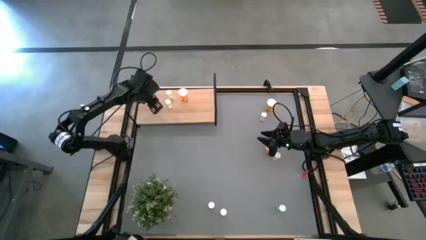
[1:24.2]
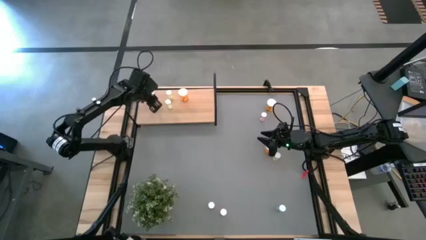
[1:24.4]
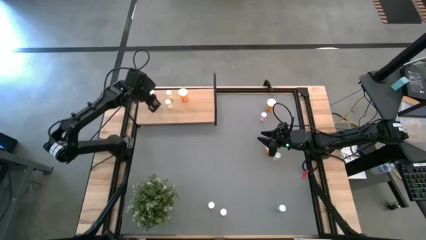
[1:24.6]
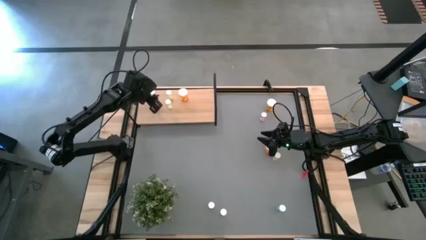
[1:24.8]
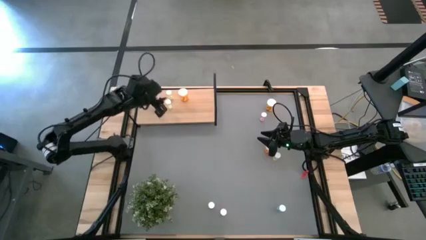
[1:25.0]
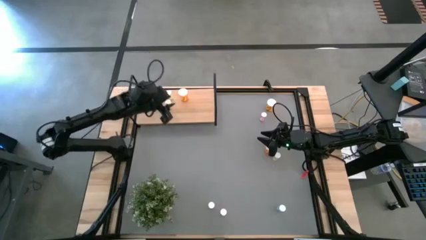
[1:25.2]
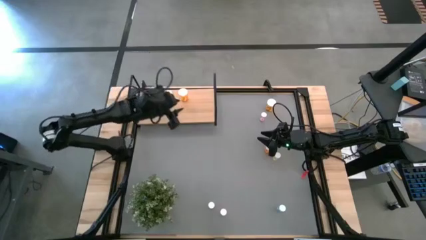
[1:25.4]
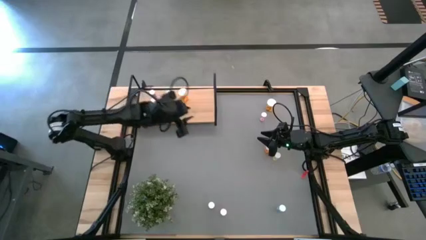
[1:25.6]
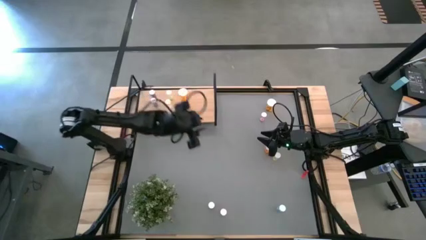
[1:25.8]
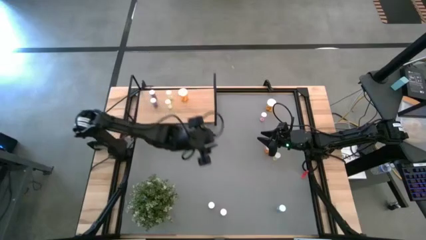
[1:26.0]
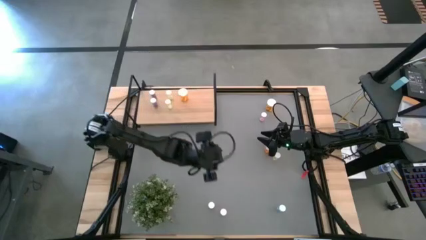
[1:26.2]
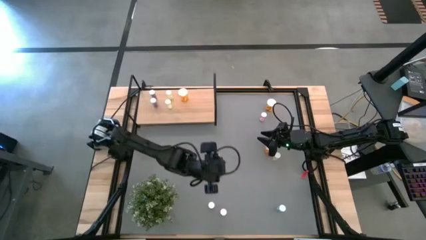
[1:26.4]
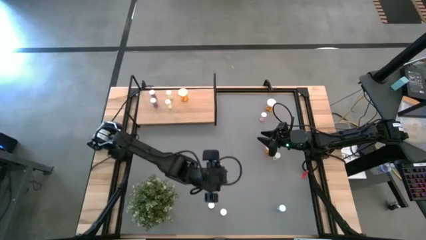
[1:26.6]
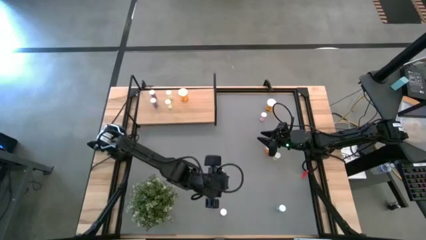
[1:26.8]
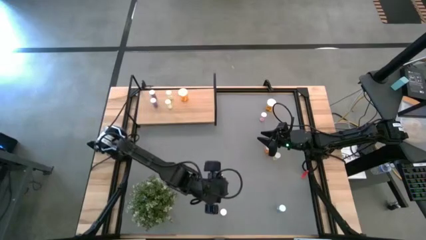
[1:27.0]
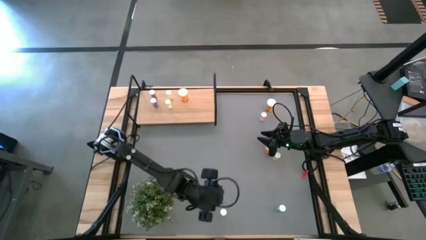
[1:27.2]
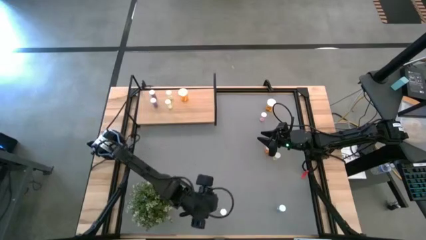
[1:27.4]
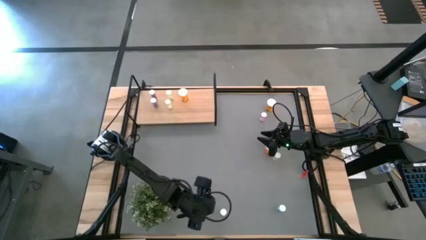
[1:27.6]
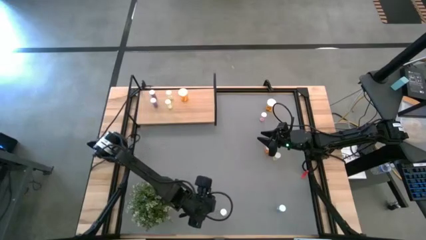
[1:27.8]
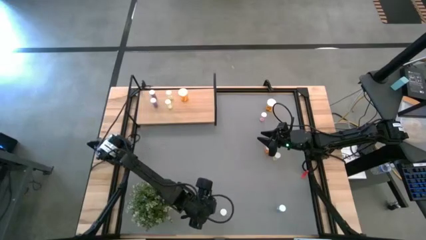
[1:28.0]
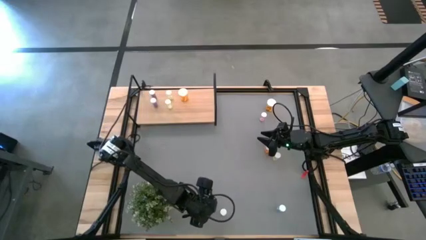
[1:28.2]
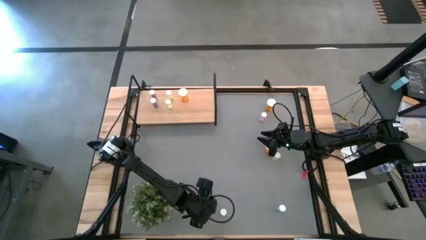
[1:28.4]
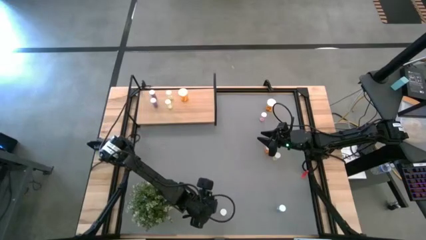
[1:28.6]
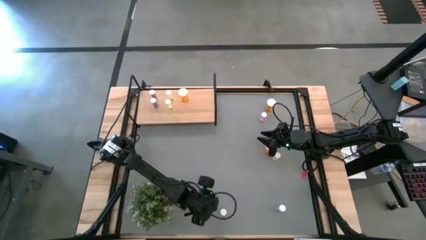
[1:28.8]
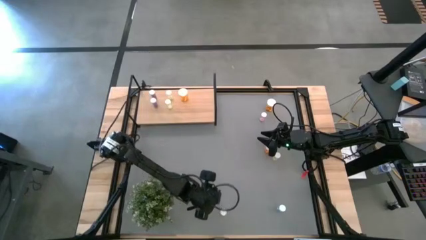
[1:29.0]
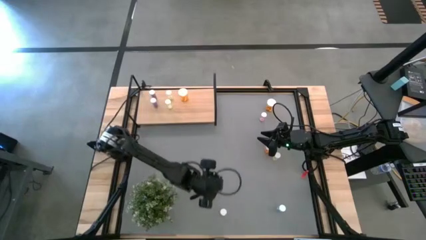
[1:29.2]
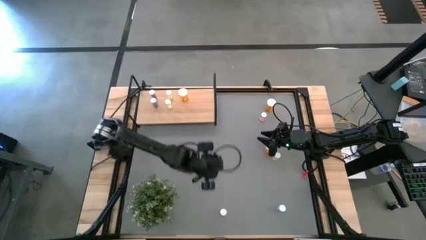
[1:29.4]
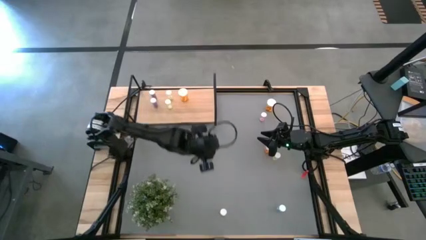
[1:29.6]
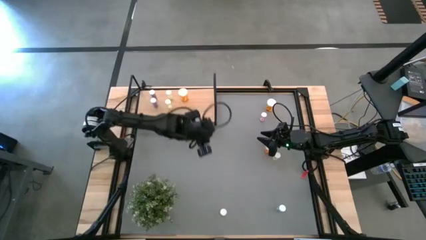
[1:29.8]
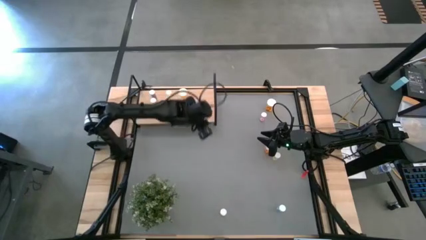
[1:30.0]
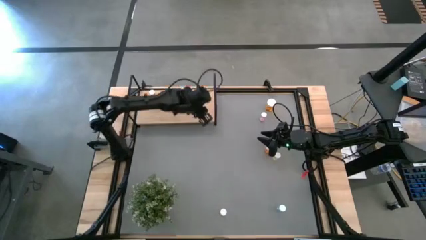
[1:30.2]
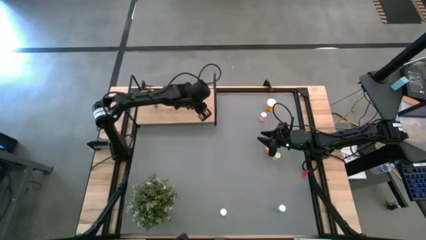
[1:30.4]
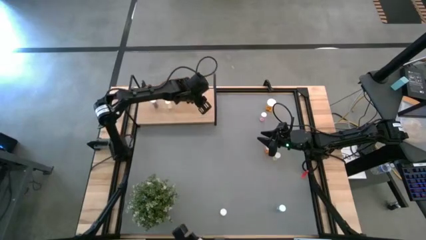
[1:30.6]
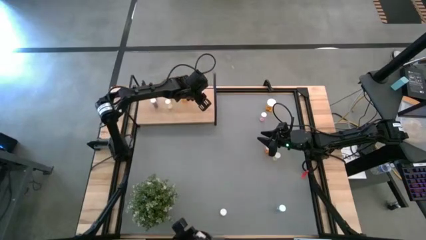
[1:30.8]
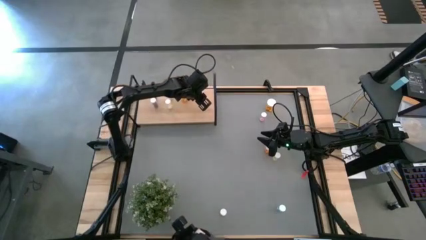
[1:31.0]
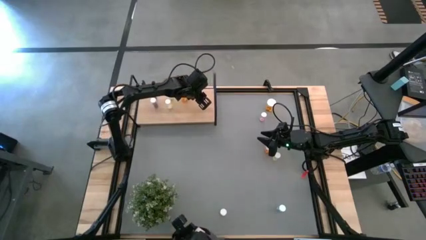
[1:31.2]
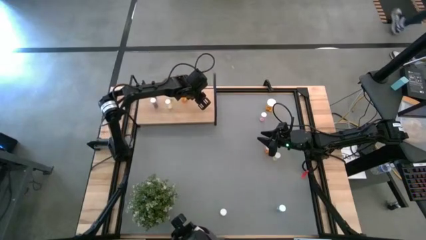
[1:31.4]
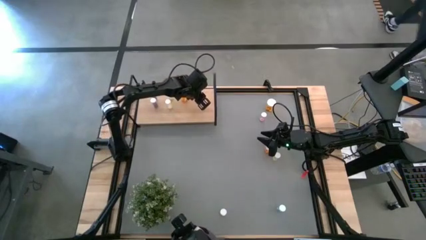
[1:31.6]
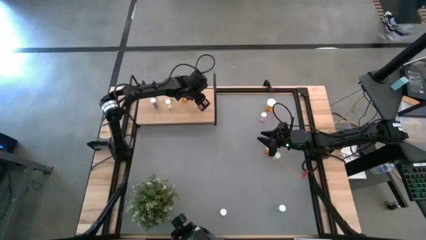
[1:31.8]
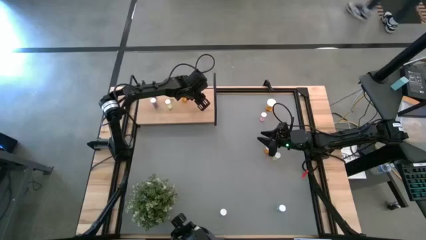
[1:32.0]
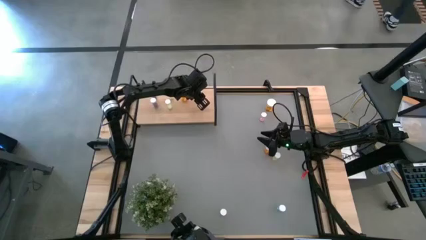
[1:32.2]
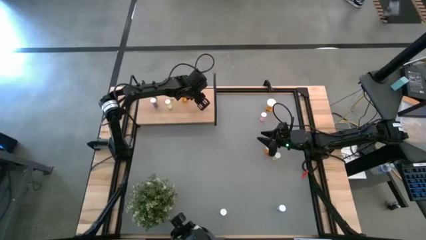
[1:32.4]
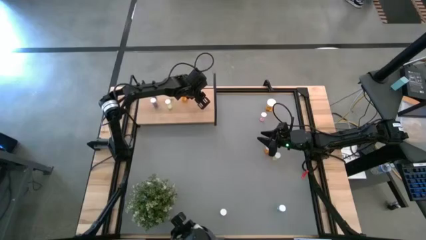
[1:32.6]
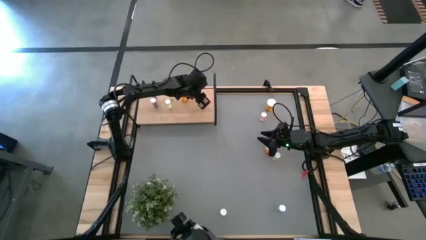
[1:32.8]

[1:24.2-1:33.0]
Task: Pick and place medicine bottles onto shelf by color
Put the bottom left pink pill bottle on the shelf

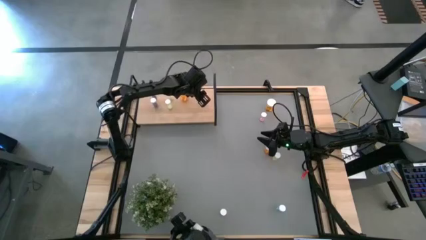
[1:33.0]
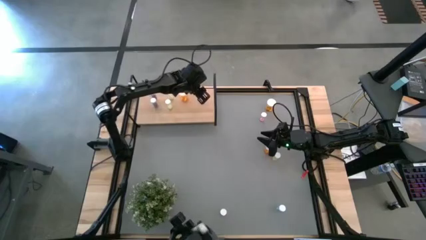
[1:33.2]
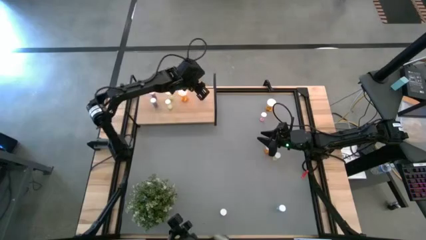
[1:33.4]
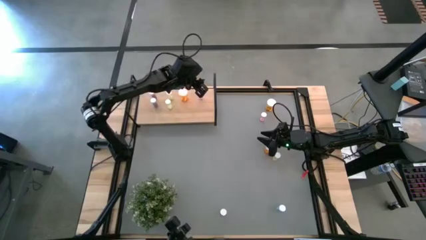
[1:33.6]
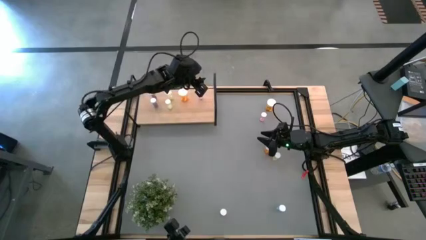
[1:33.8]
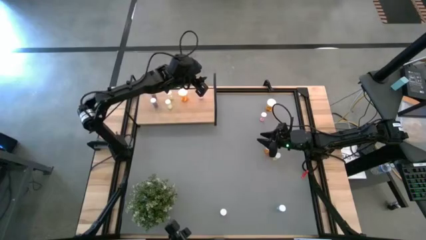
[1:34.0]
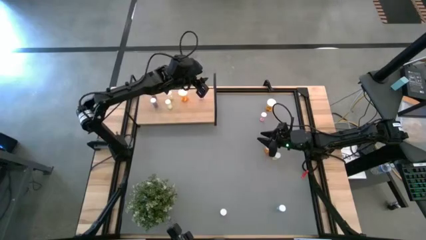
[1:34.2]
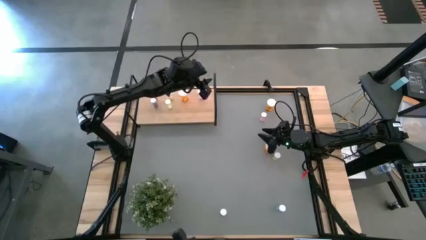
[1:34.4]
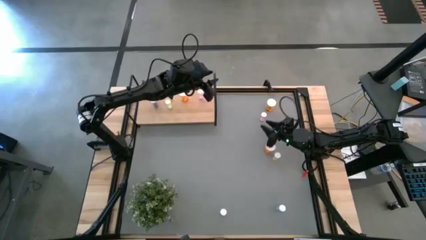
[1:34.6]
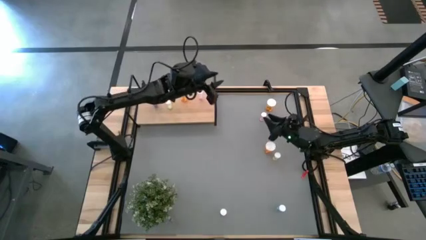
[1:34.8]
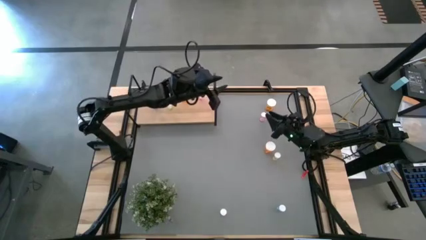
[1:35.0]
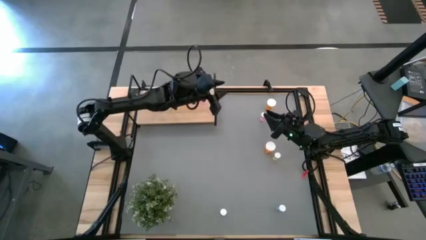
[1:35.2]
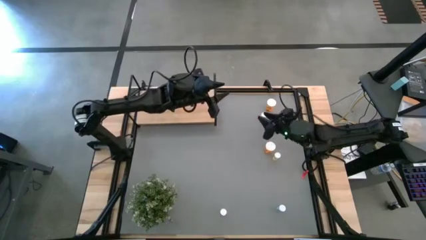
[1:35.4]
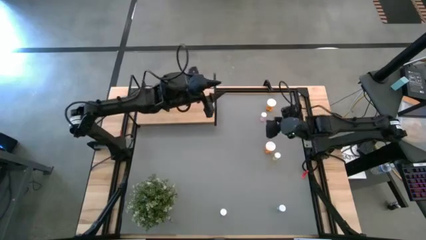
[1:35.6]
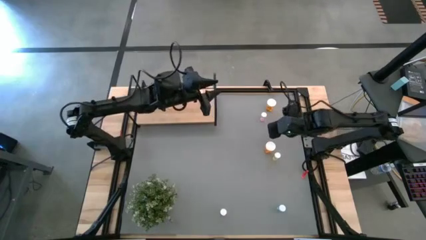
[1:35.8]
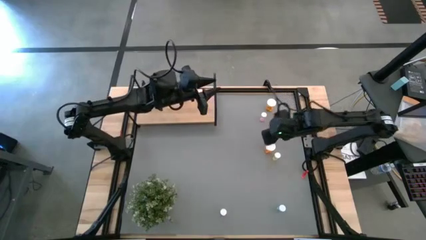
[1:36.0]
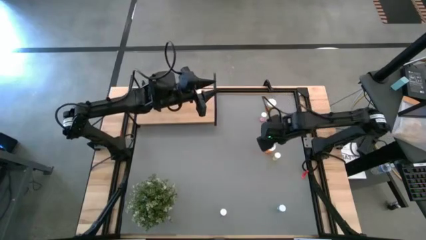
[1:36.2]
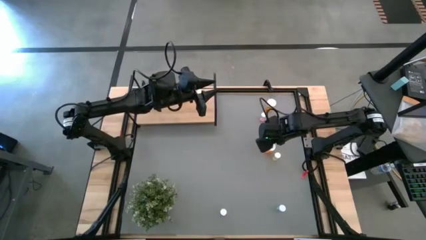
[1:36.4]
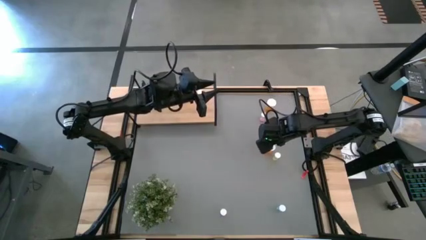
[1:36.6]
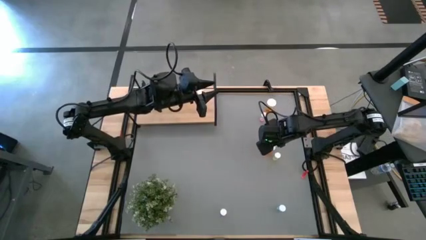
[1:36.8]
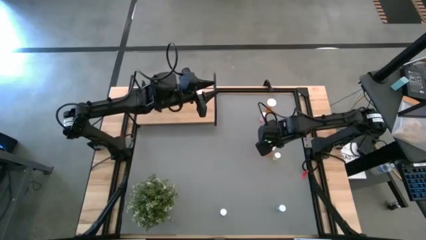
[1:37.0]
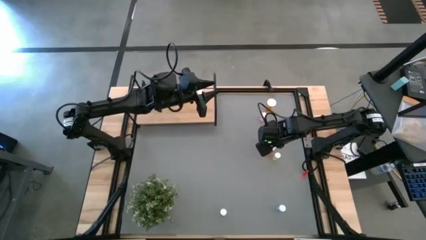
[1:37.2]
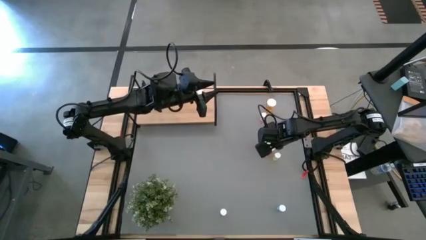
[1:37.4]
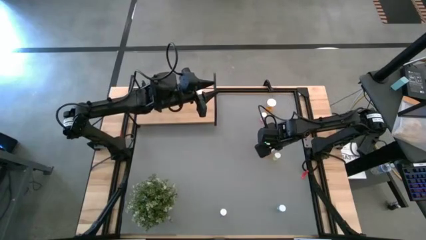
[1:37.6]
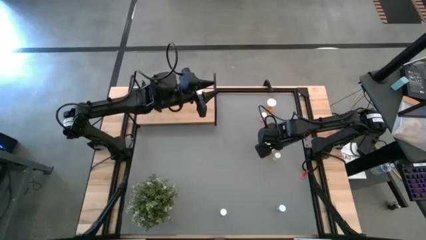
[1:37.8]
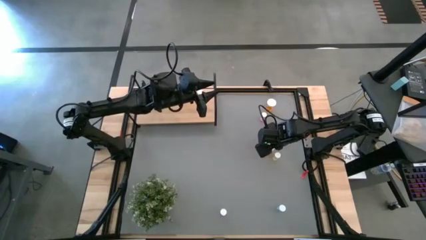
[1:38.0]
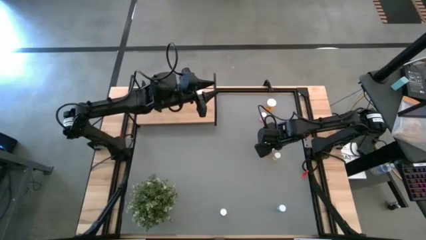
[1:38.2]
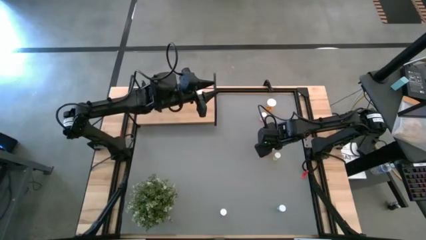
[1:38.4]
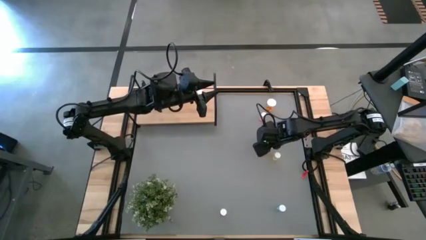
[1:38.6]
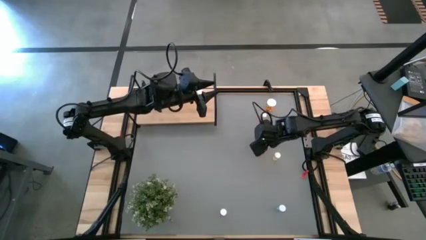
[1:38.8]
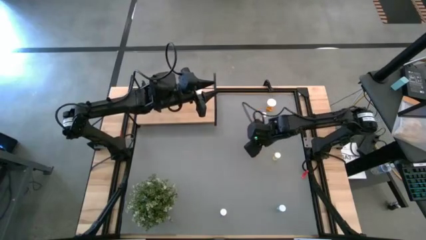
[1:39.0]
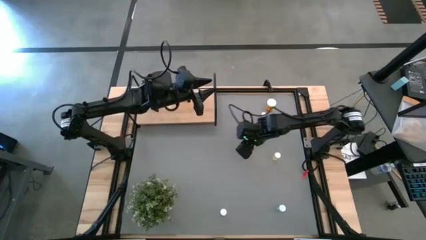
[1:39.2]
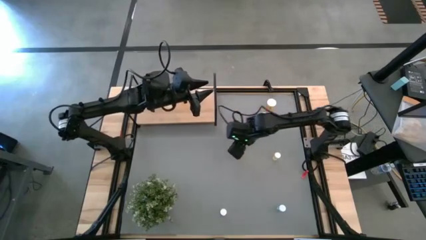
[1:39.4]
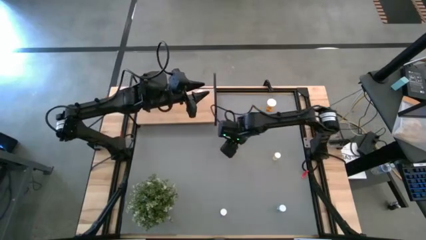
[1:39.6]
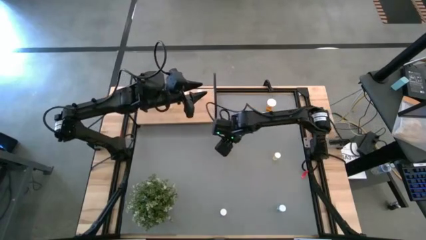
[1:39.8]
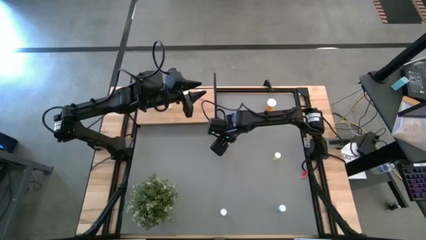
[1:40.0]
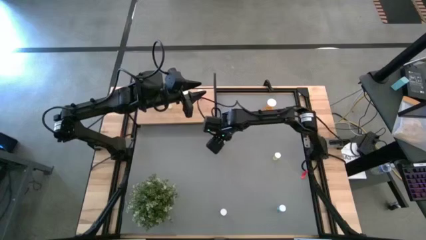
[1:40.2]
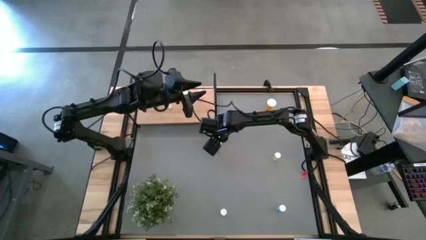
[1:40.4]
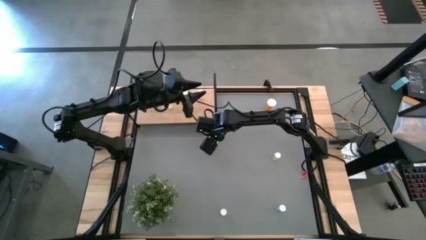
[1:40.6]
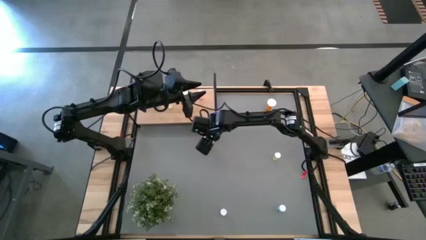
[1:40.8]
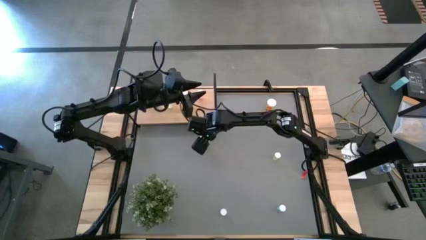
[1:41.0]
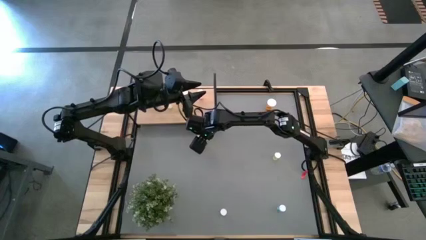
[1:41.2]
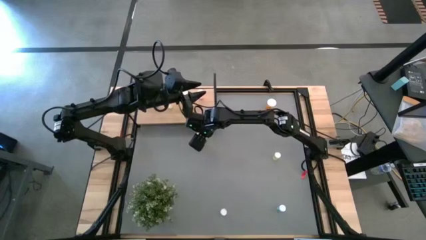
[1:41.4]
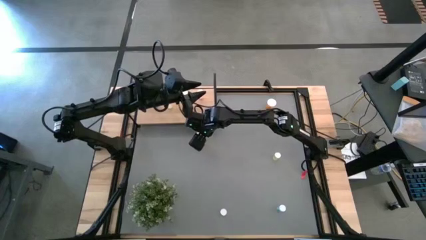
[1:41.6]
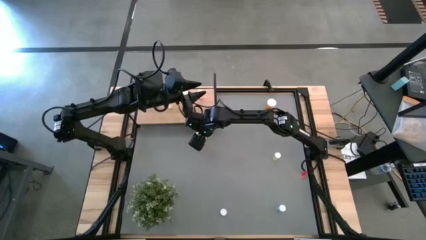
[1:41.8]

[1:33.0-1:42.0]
Move the bottom orange pill bottle to the middle of the table
